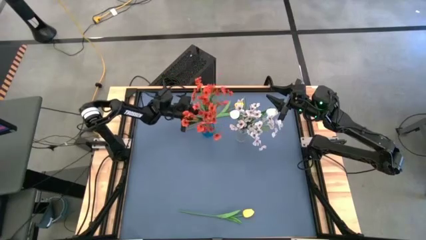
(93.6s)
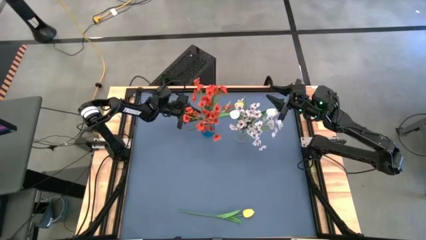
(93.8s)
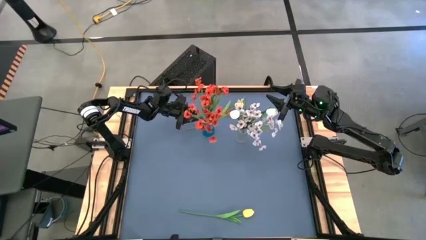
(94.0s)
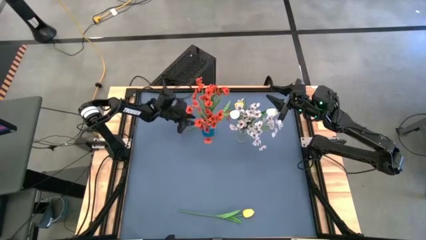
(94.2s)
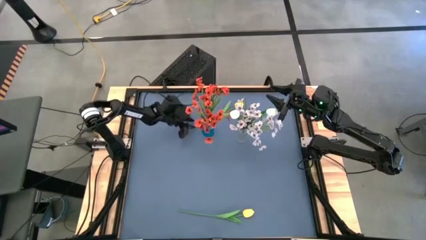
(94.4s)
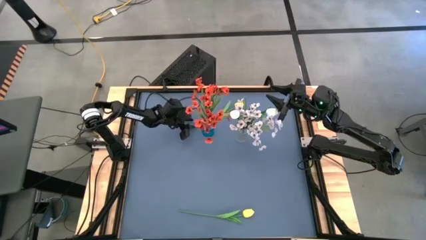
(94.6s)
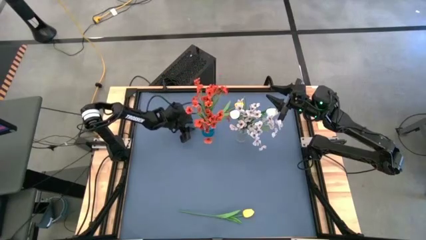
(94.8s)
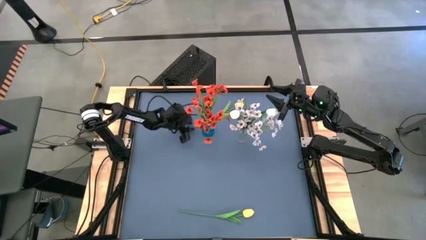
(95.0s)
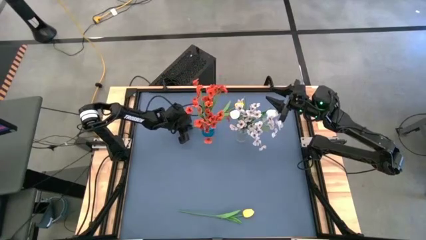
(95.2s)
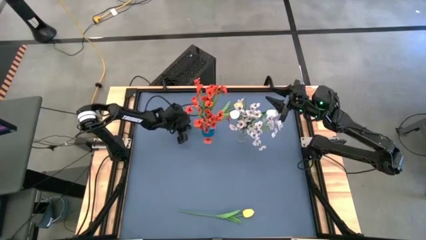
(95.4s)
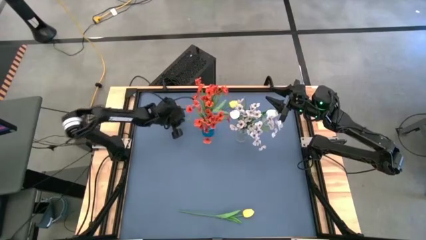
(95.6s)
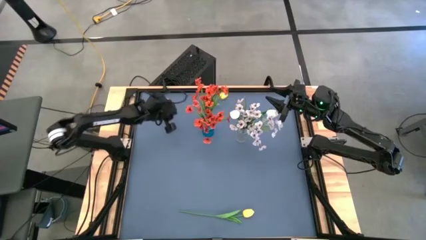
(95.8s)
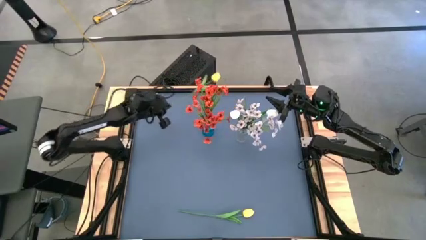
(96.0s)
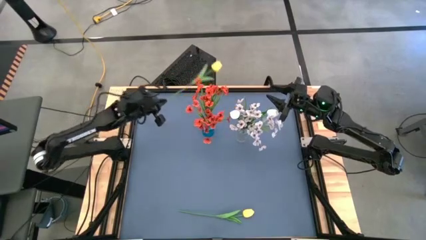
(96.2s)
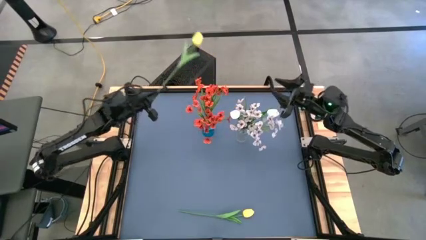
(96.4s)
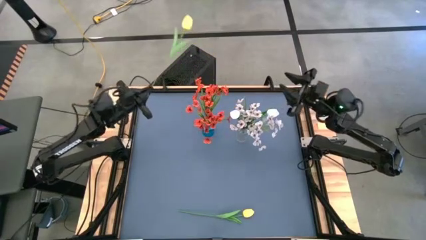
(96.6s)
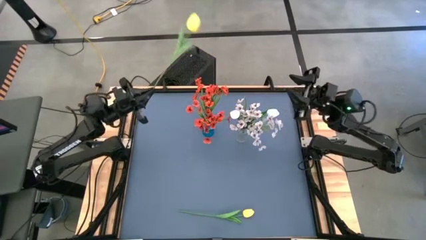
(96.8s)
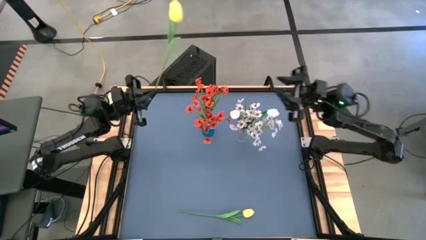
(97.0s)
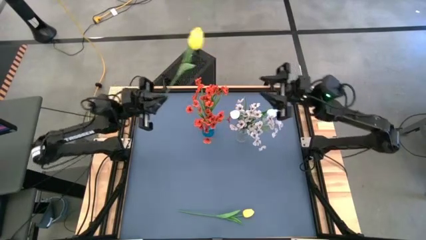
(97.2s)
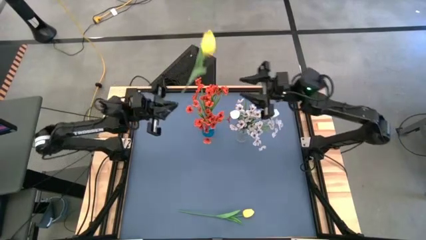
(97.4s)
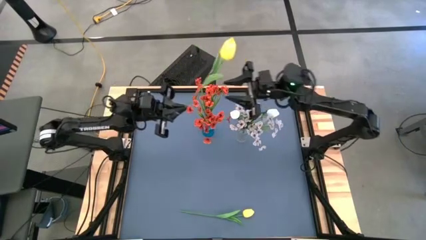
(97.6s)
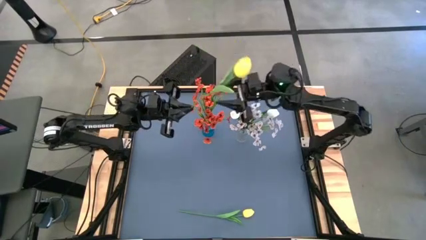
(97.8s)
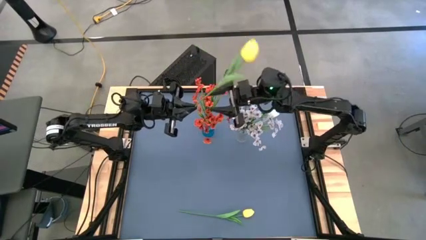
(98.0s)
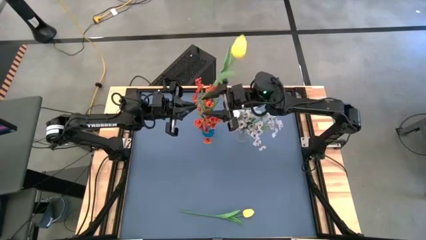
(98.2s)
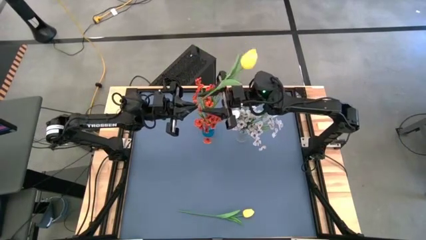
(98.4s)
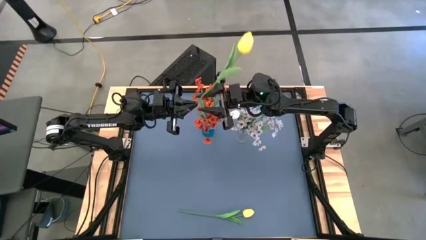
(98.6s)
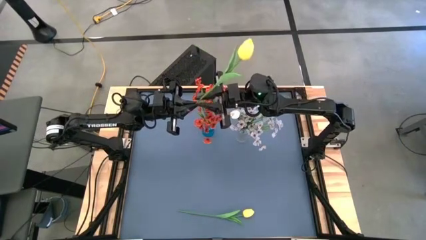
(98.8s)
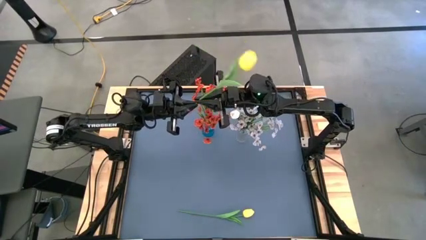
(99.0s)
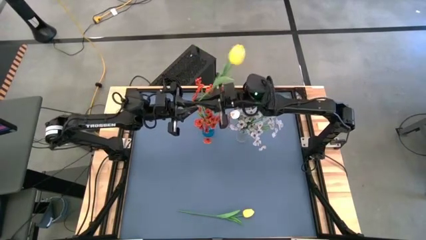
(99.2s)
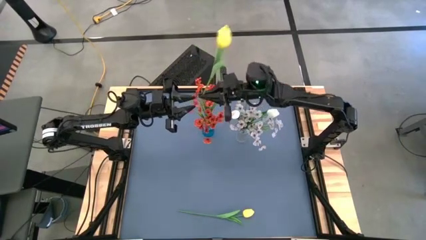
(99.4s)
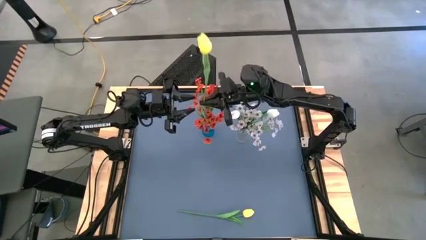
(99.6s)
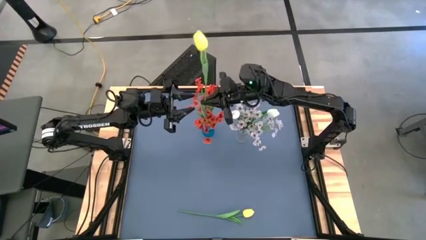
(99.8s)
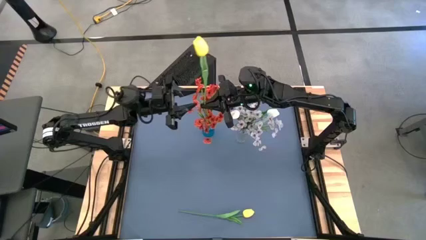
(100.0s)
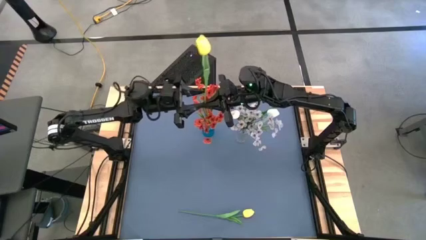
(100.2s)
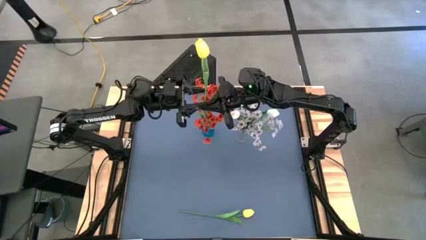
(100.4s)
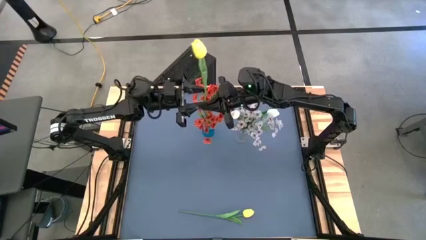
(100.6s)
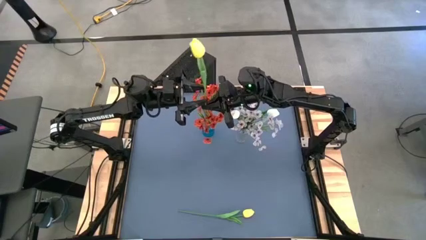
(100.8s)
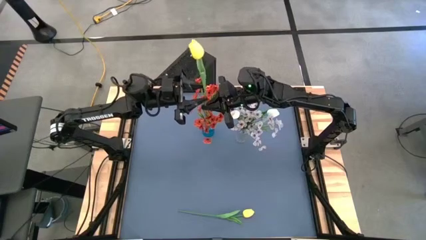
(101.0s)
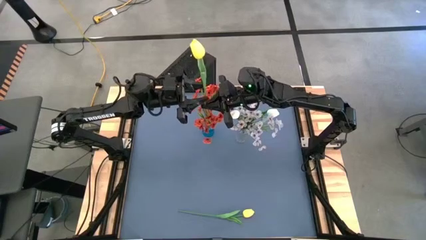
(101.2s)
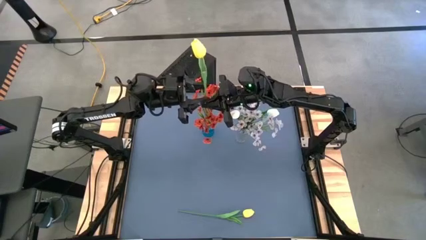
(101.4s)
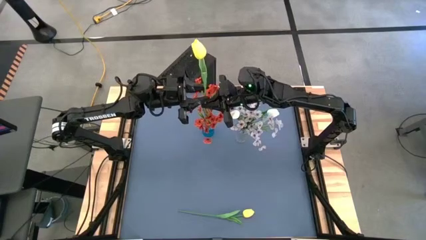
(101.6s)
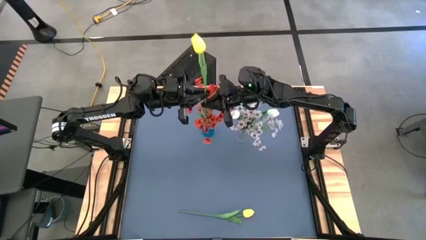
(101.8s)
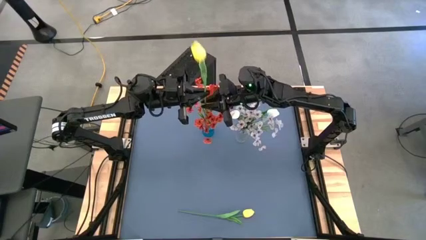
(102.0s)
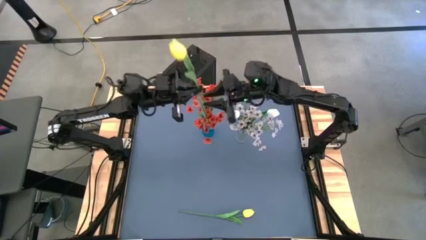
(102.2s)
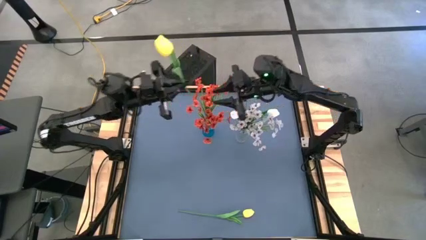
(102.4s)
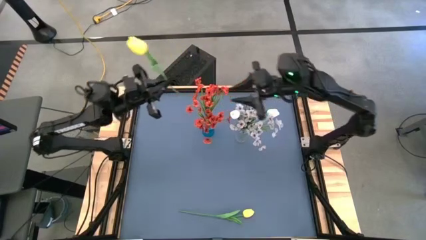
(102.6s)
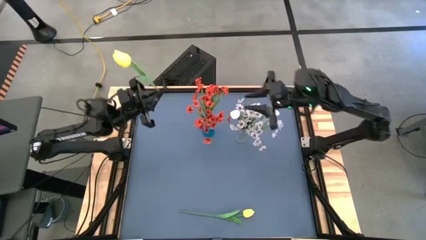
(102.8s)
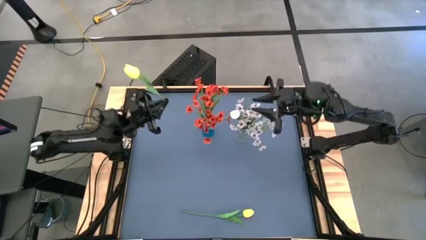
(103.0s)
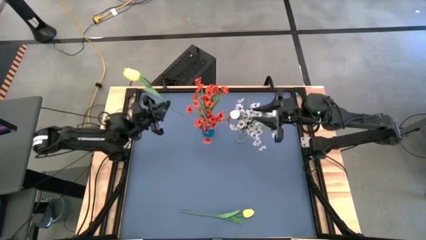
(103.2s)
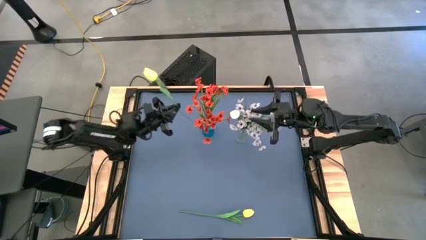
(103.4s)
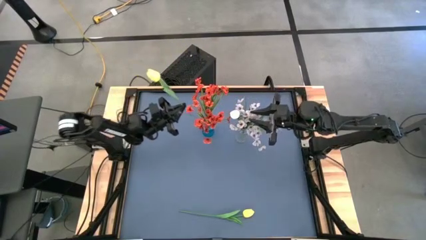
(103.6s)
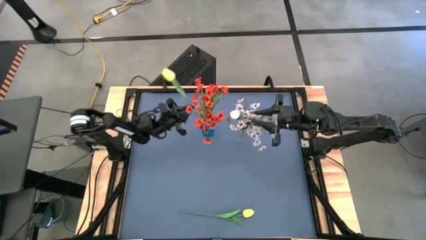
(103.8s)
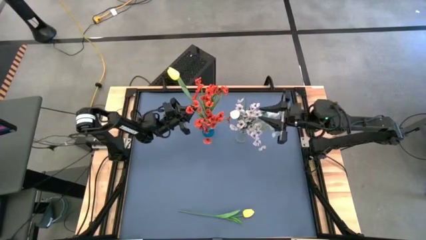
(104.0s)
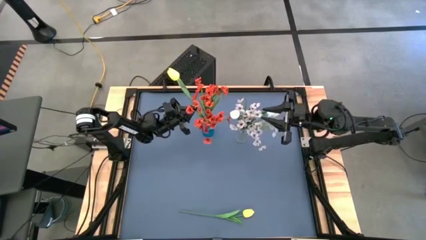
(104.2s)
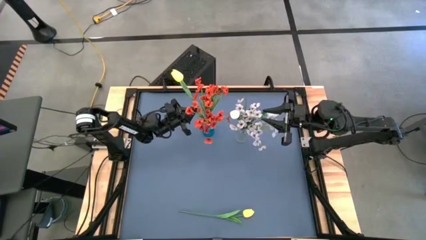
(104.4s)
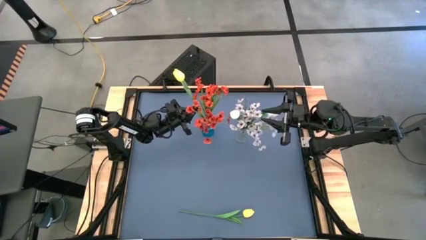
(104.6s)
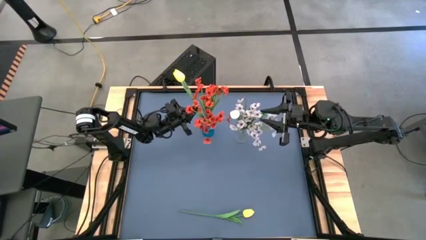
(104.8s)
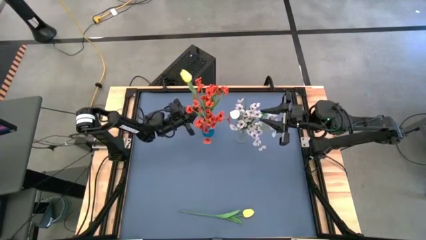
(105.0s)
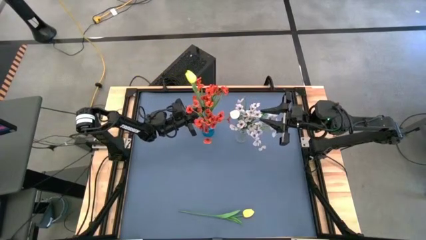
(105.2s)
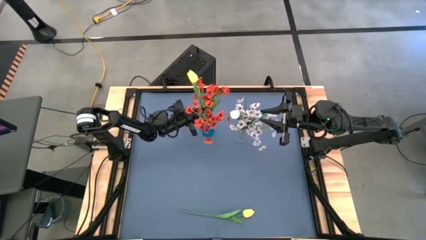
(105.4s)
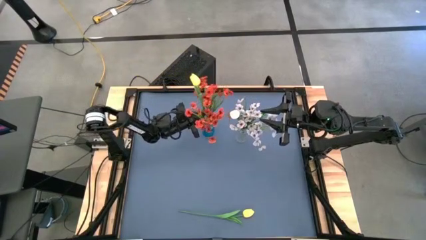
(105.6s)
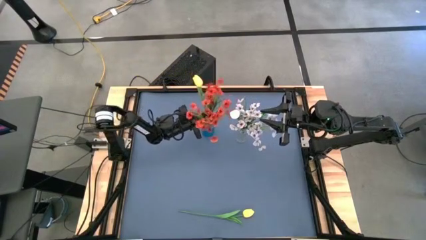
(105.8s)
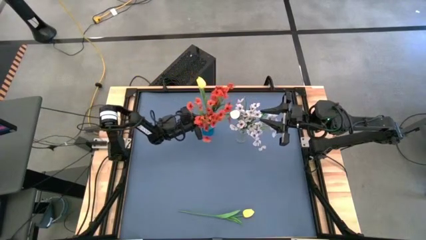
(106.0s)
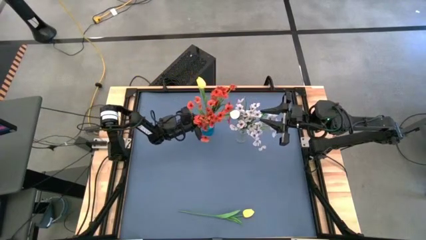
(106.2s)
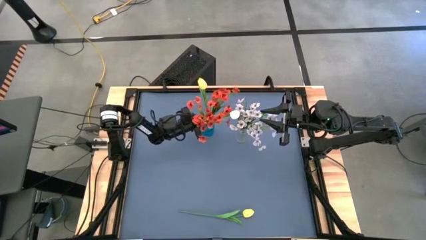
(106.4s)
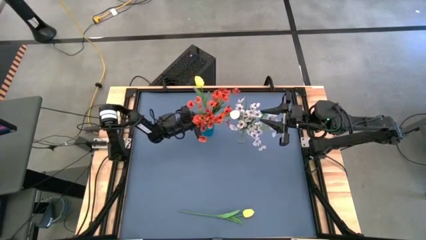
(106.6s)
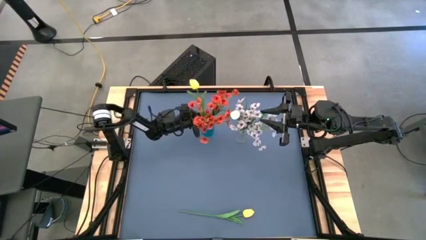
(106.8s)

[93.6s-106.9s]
Task: Sort flowers into vase by color
Put the top yellow tulip into the blue vase

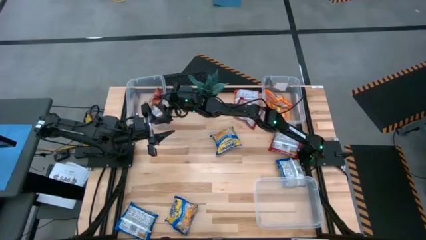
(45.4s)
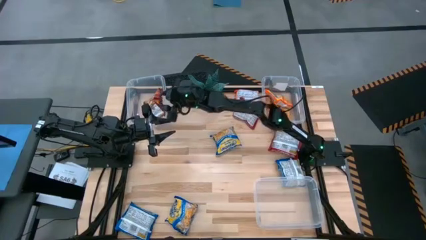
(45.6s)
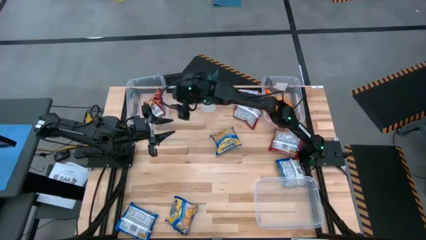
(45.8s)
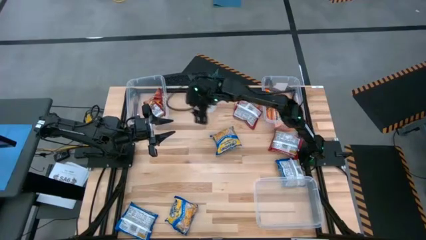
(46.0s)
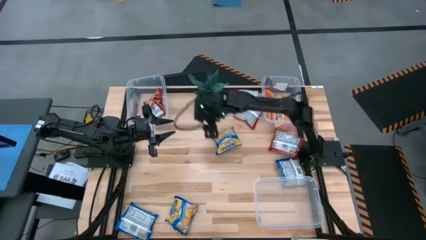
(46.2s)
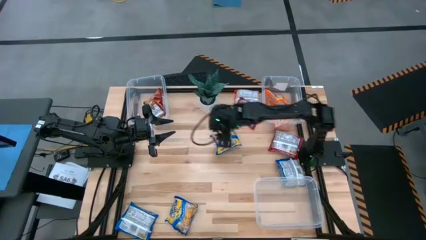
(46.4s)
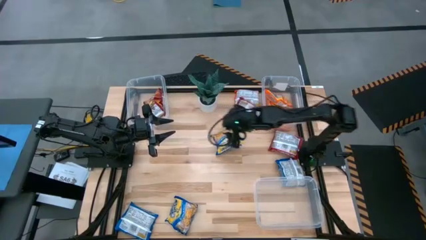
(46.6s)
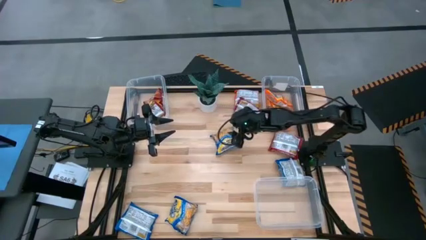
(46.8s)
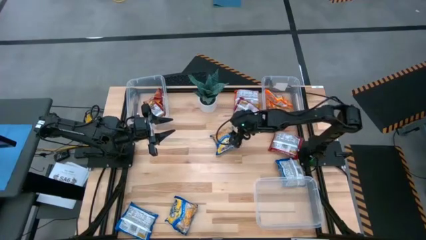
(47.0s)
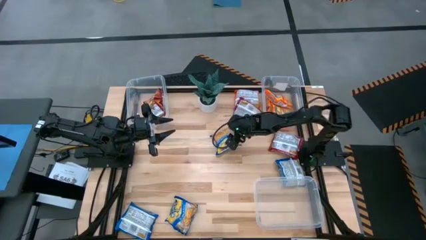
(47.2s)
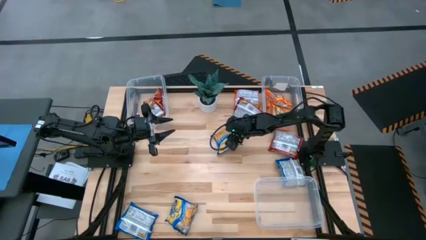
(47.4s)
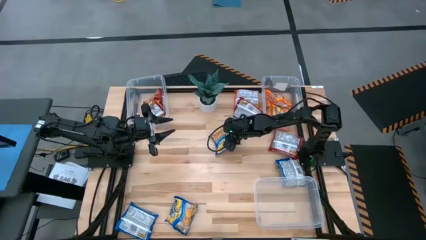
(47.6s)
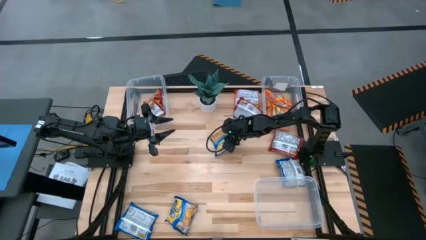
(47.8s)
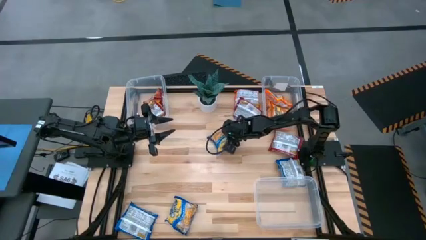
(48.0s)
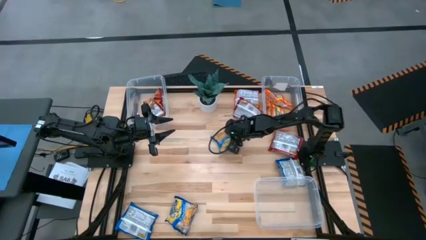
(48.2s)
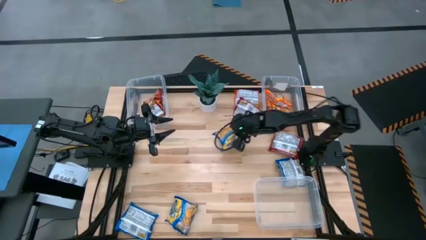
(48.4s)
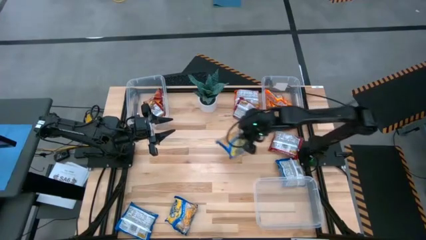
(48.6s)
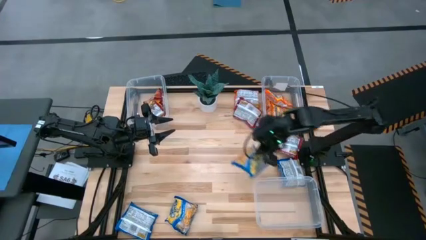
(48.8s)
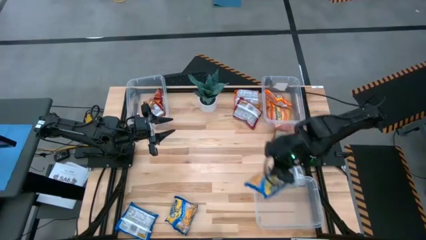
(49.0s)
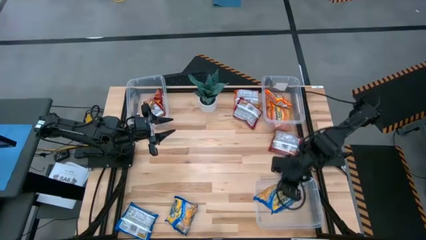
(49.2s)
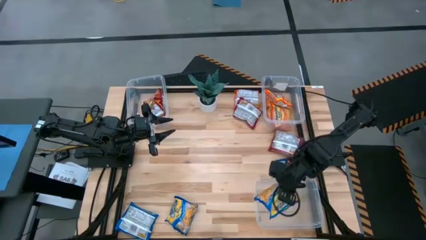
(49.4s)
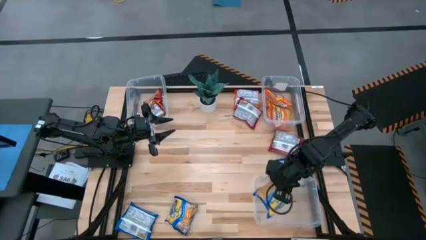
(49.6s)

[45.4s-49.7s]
Task: Sort Maruchan noodles
Put the blue noodle pack in the bottom right transparent bin
